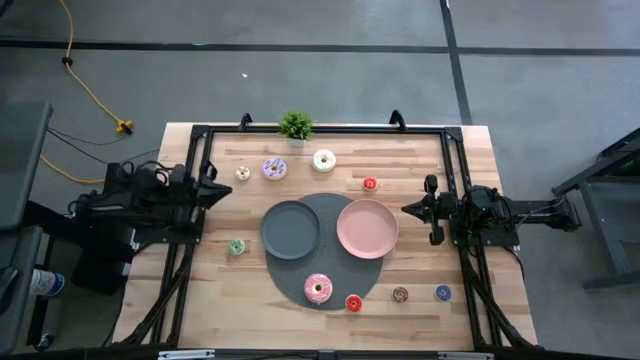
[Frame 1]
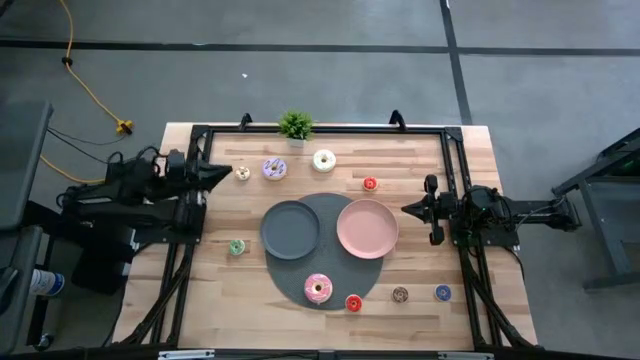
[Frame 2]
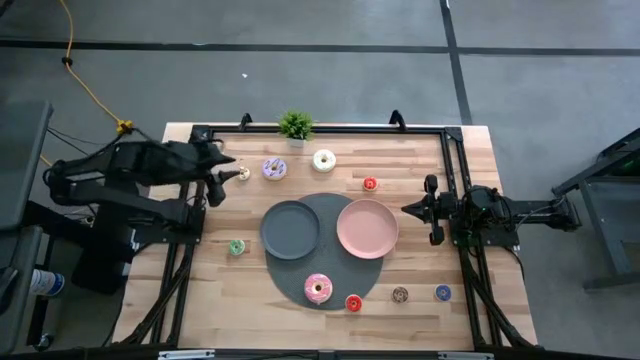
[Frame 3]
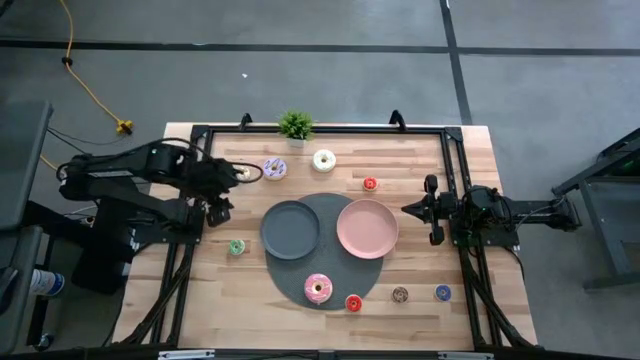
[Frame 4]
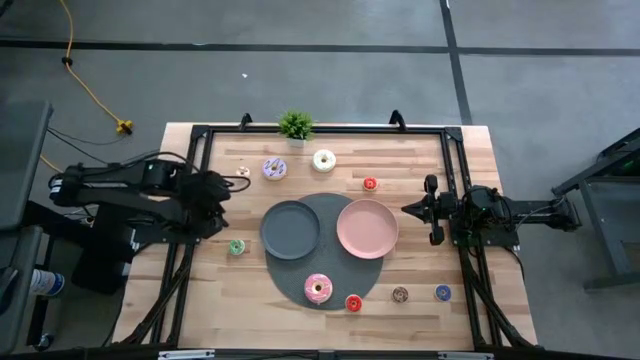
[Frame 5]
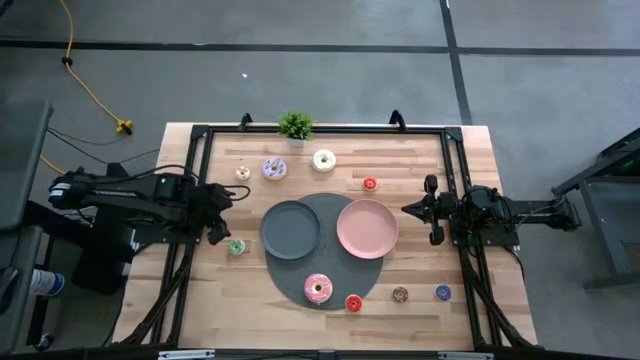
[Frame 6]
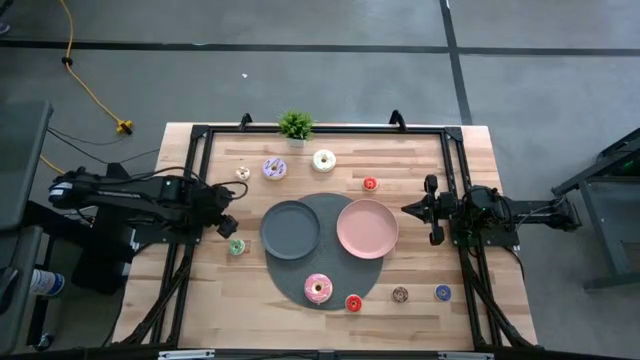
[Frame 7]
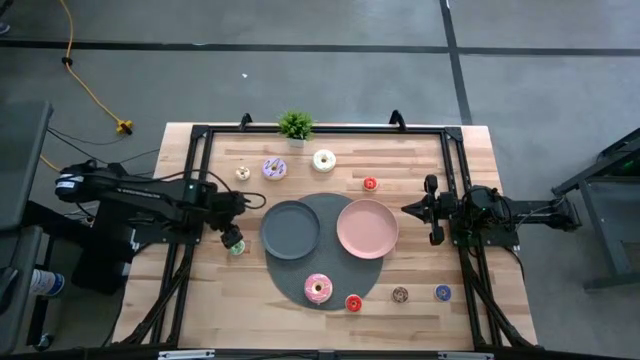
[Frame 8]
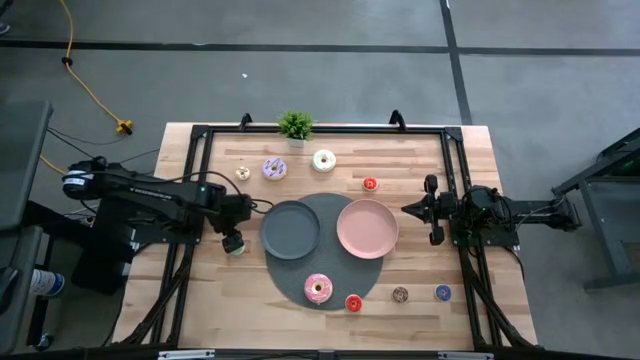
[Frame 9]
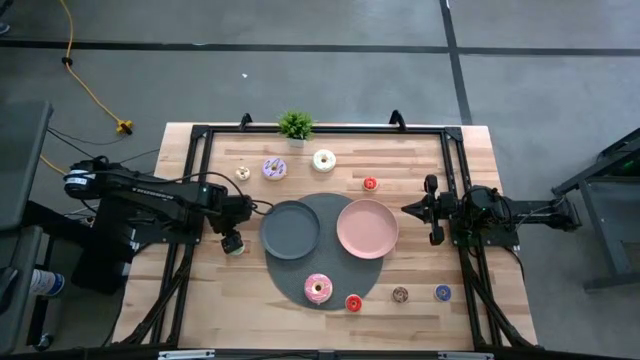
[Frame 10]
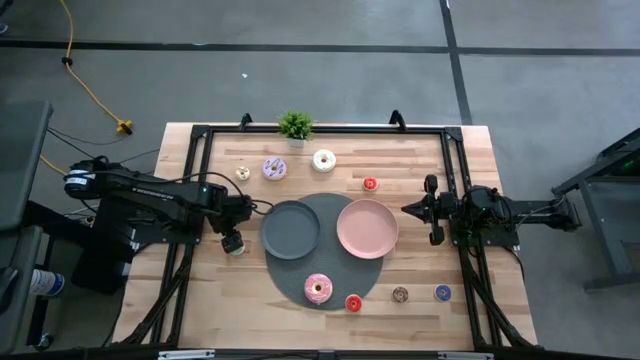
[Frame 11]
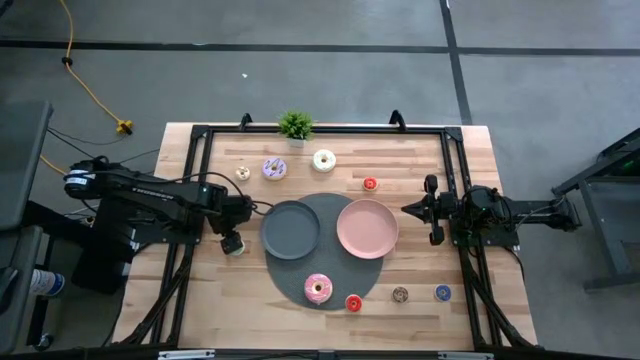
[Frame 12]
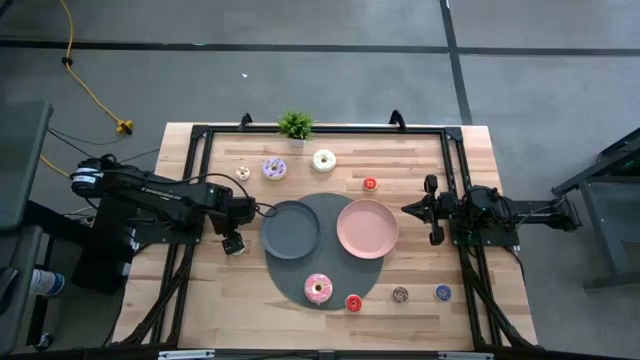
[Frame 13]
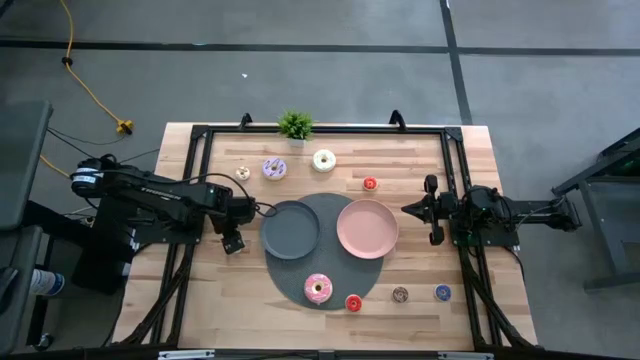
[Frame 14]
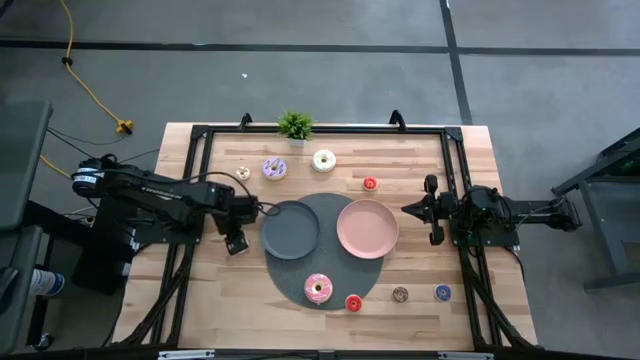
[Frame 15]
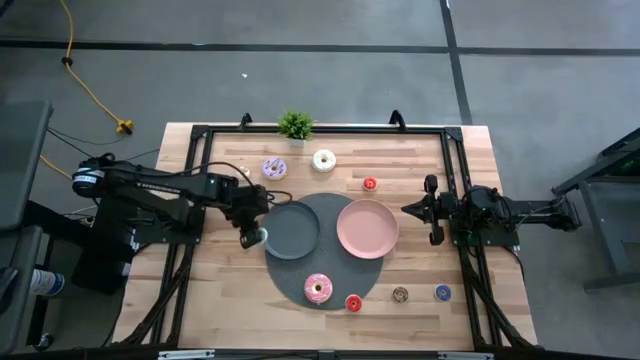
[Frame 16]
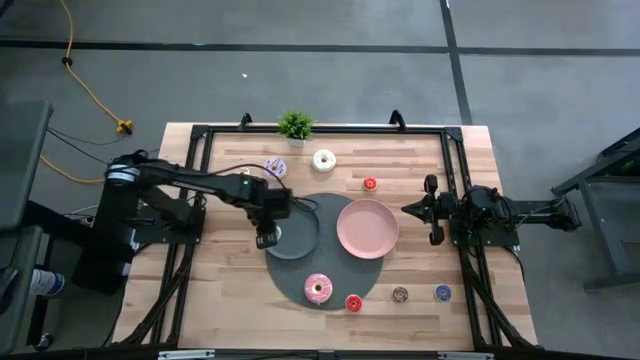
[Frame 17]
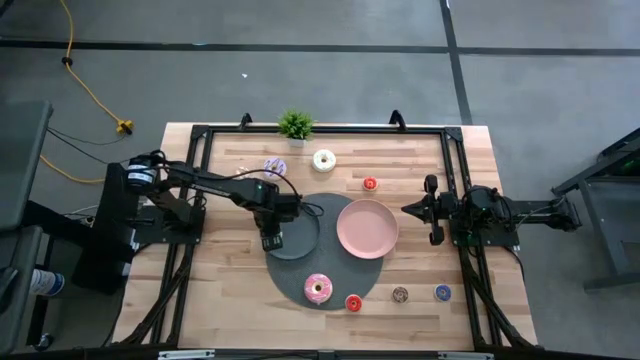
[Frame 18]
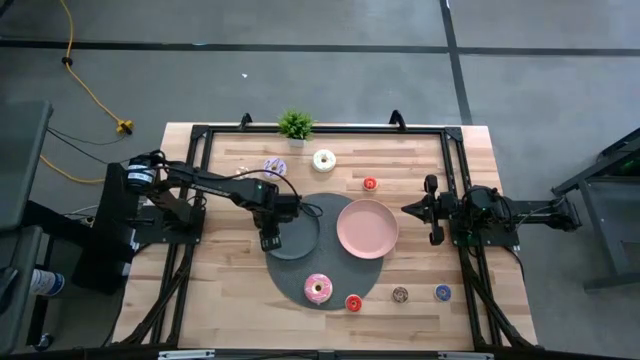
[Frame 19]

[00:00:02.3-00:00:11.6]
Task: Pick & Place donuts
Put the small green donut on the gray plate

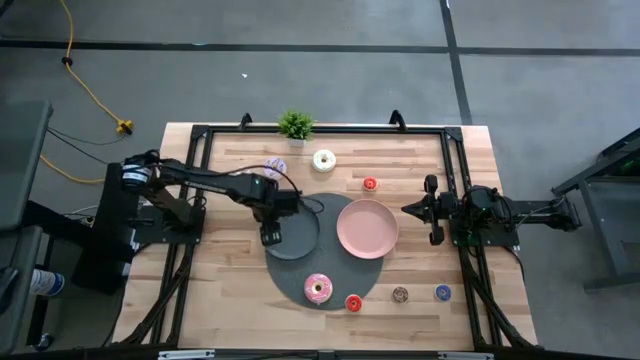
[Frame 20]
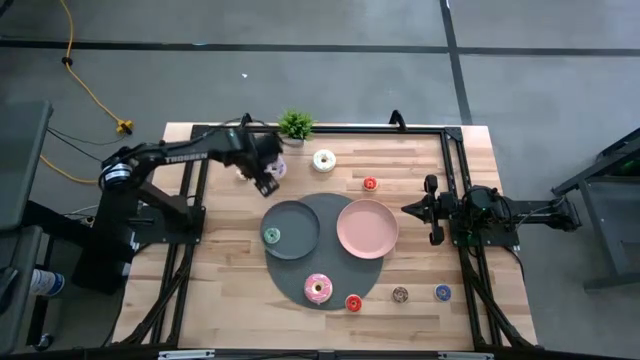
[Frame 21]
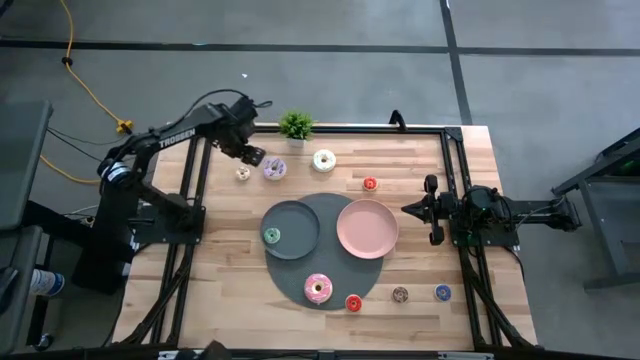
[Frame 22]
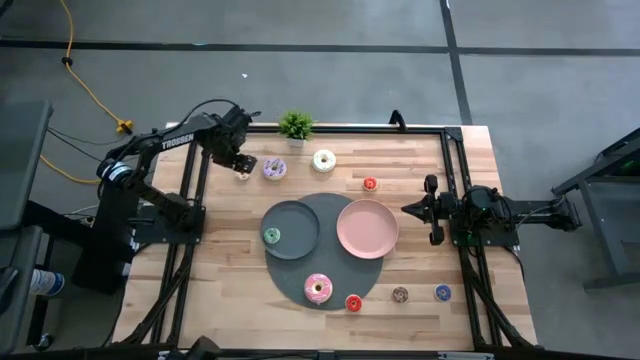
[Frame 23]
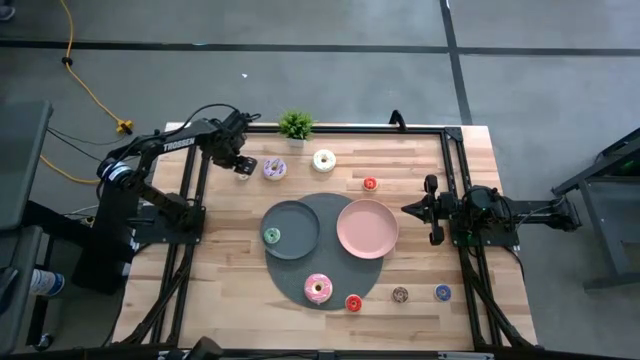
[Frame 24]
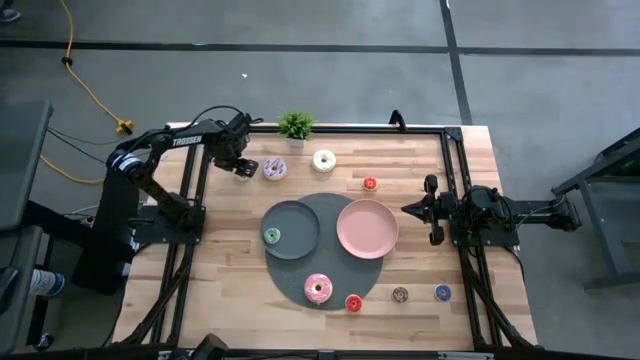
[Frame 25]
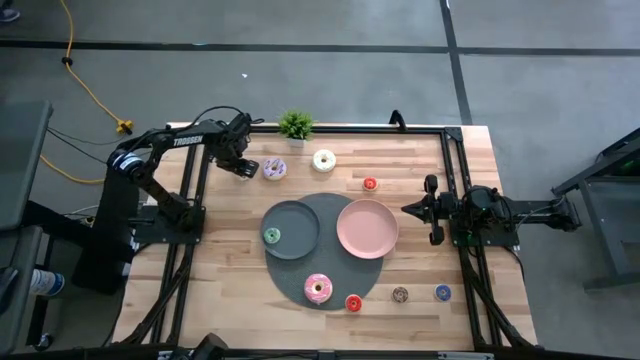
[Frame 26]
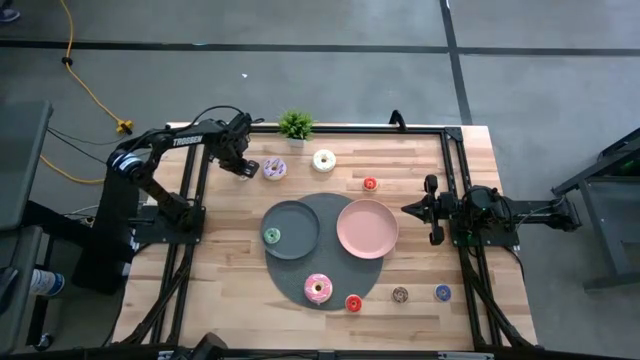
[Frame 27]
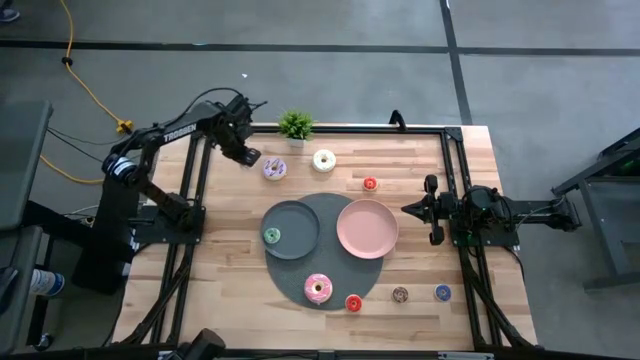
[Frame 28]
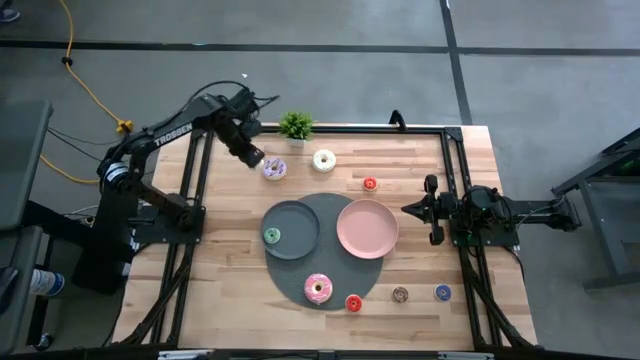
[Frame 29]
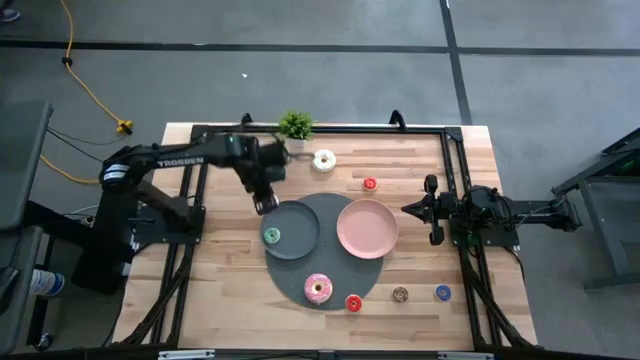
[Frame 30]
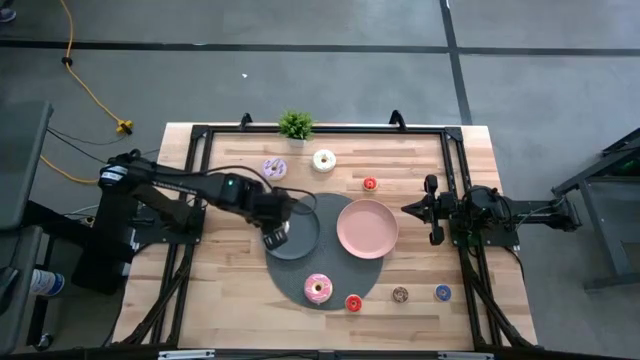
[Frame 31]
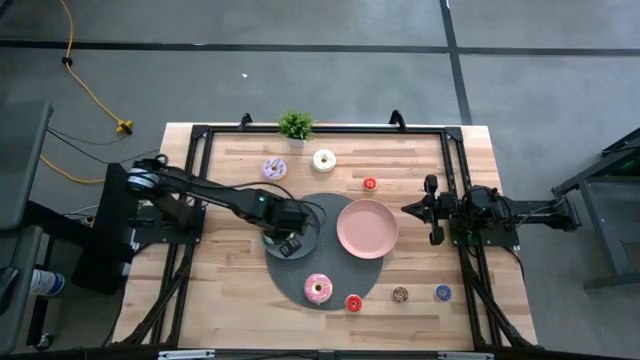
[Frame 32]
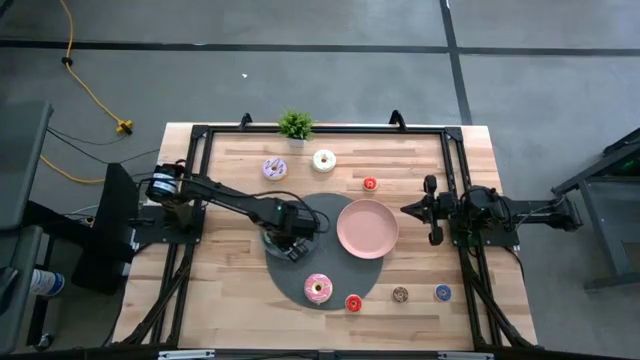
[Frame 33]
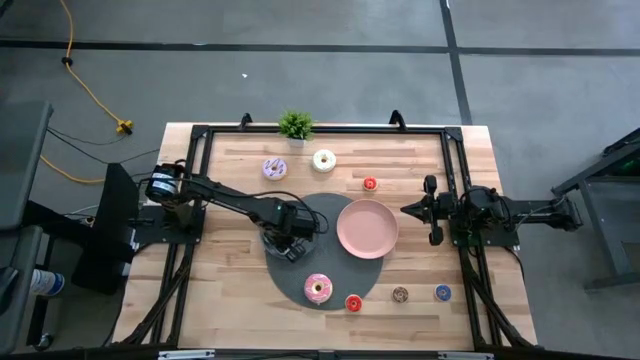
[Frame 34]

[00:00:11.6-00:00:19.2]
Put the small white donut on the gray plate

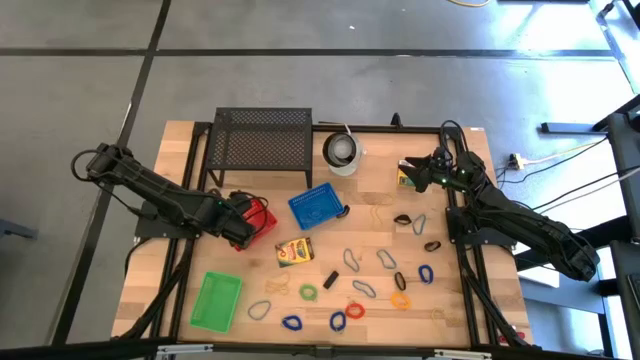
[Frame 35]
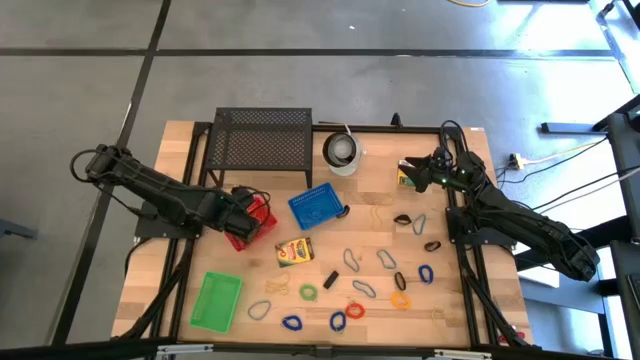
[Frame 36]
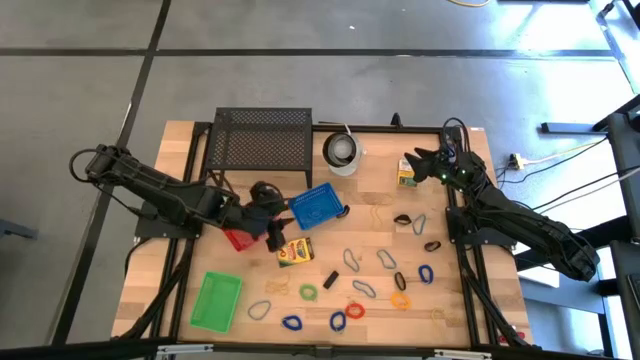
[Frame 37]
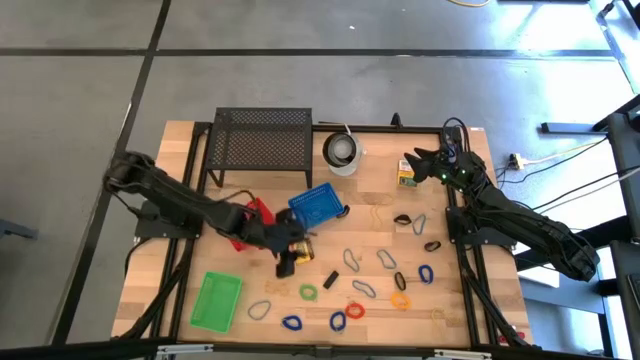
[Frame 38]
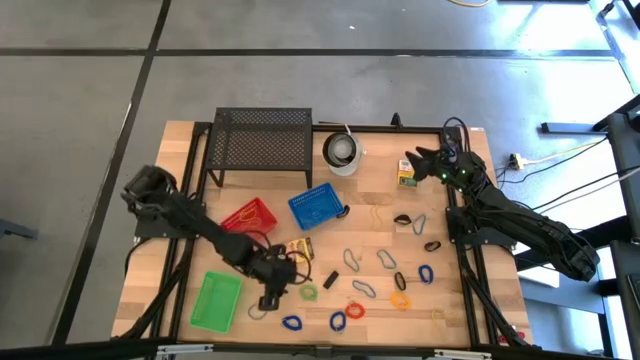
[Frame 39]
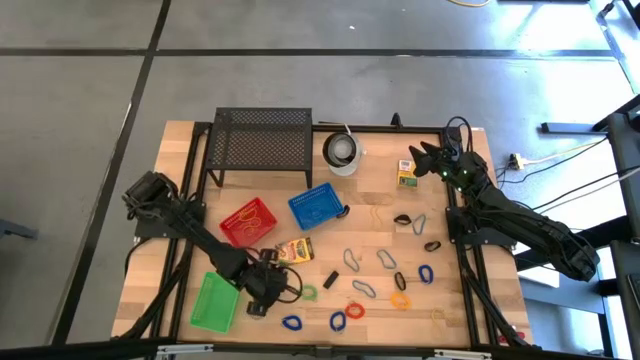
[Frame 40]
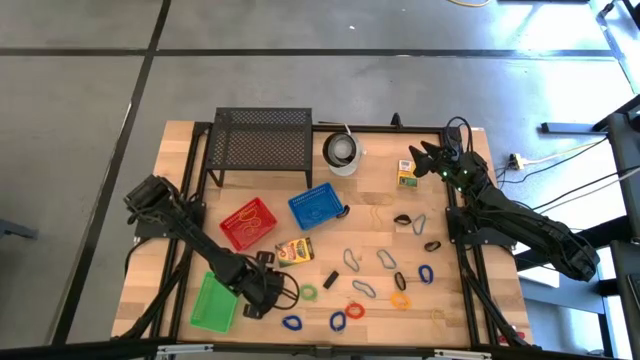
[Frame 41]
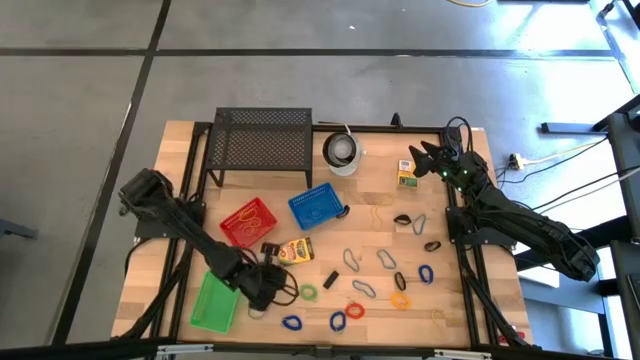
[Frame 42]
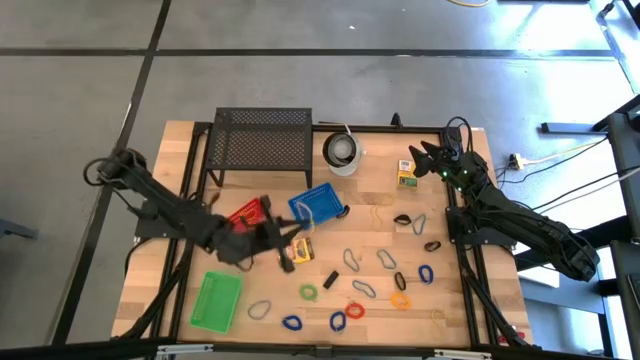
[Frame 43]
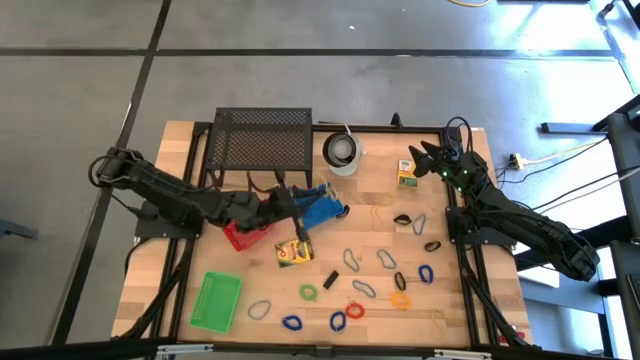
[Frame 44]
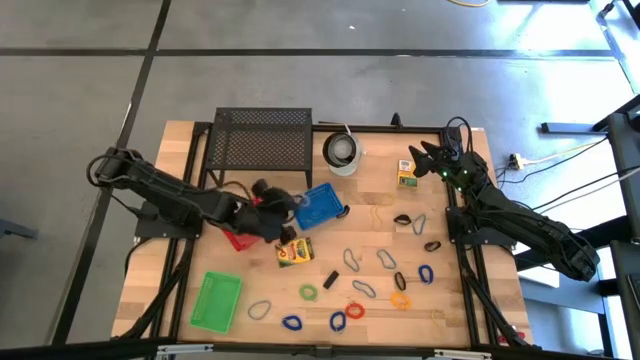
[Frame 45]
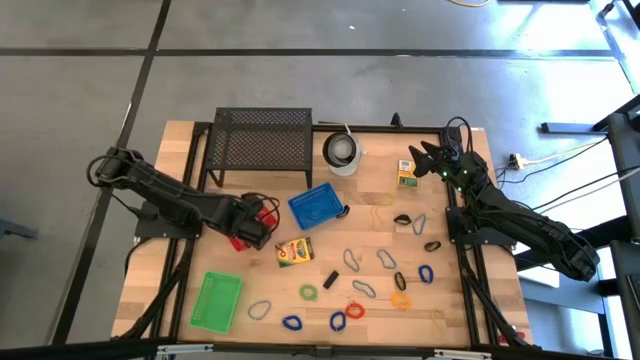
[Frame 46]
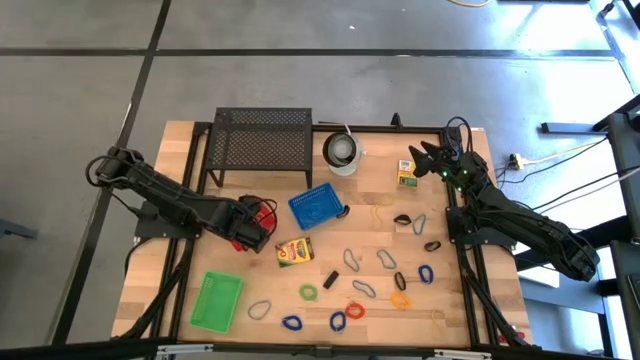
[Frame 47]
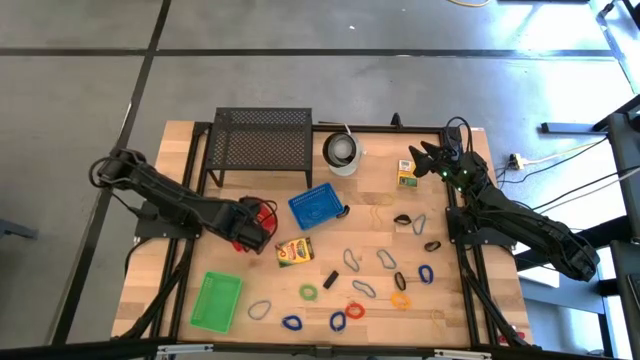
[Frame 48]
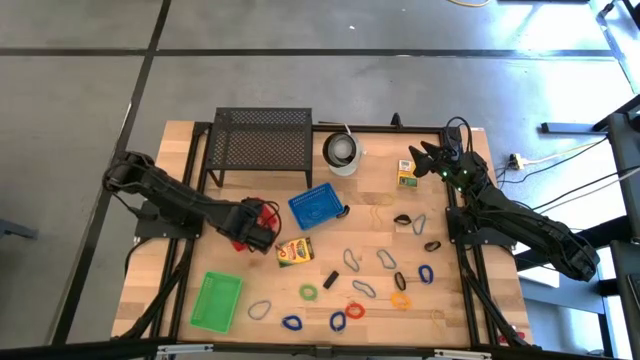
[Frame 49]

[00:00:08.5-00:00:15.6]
Task: Pick & Place Office Desk Supplies
Put the yellow rubber band into the red bin
